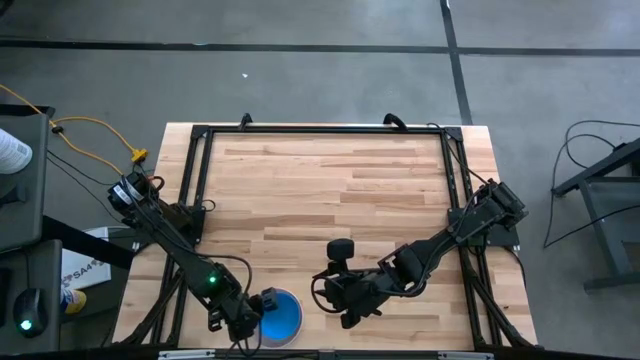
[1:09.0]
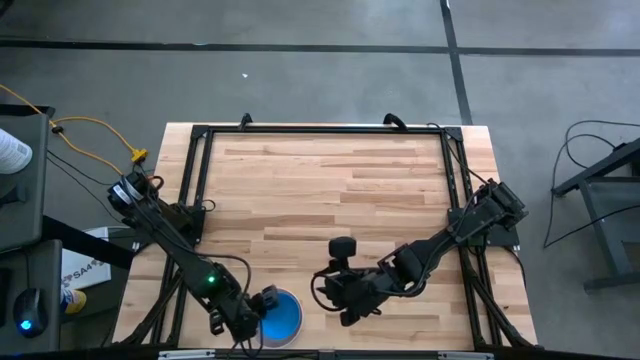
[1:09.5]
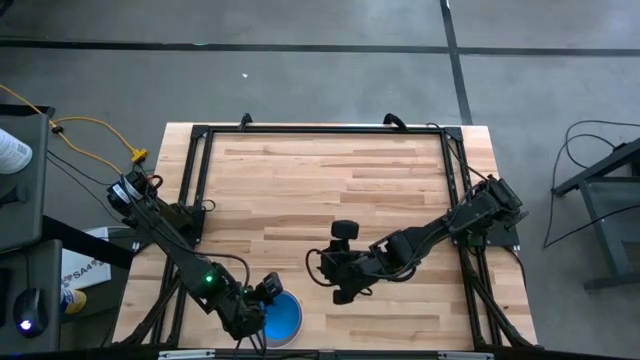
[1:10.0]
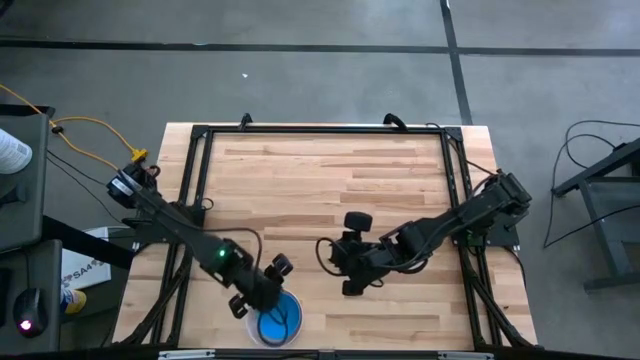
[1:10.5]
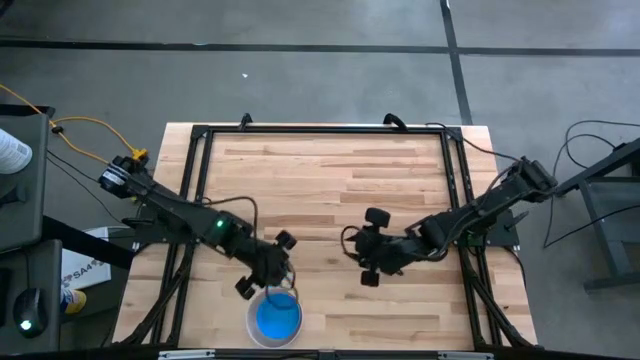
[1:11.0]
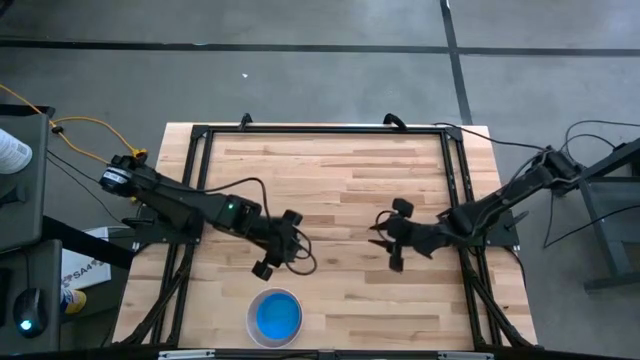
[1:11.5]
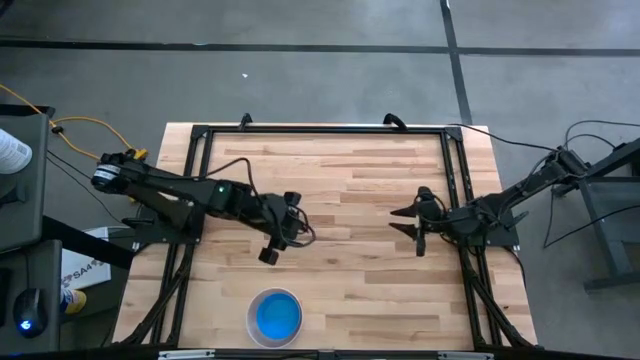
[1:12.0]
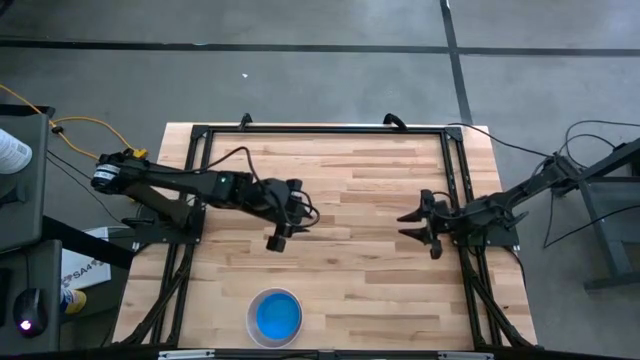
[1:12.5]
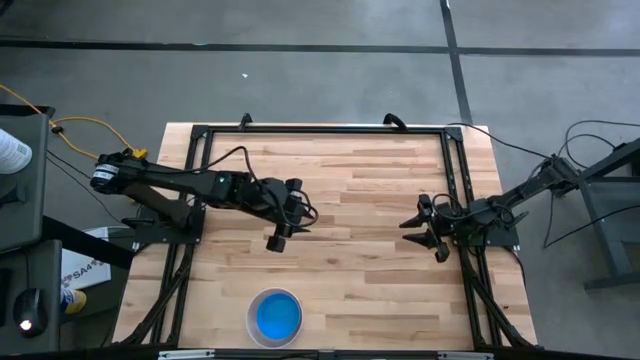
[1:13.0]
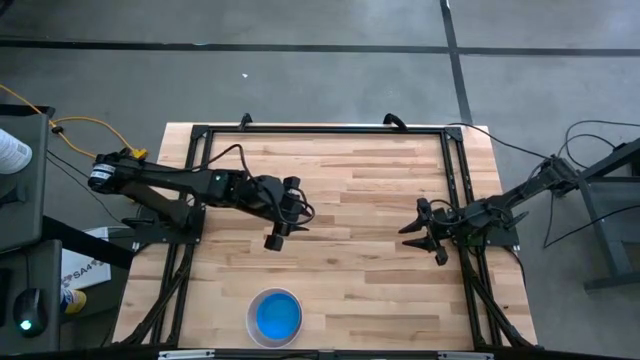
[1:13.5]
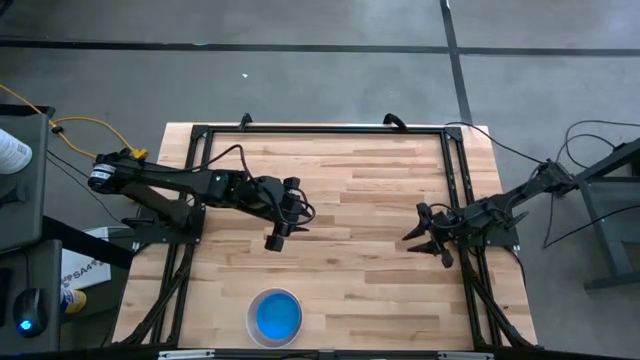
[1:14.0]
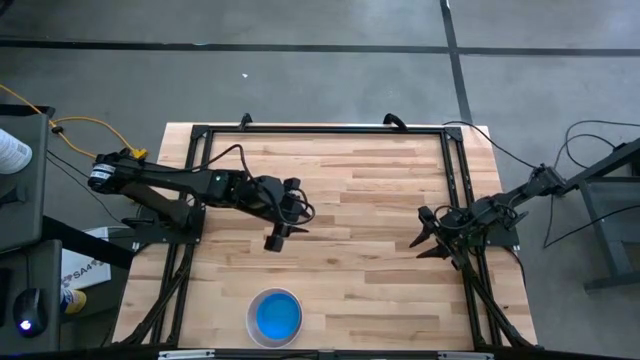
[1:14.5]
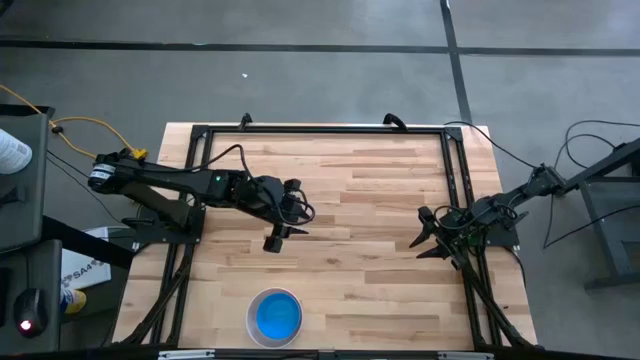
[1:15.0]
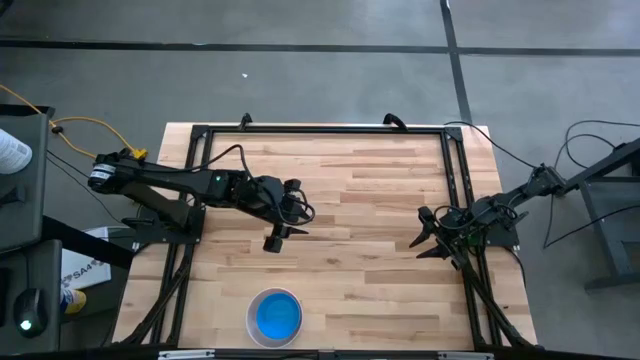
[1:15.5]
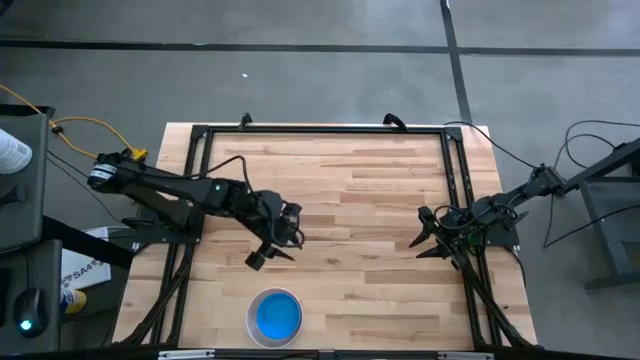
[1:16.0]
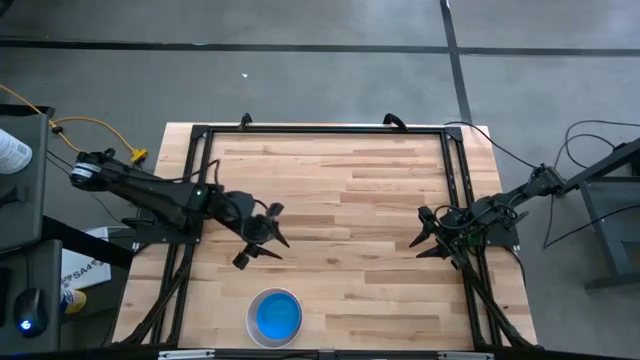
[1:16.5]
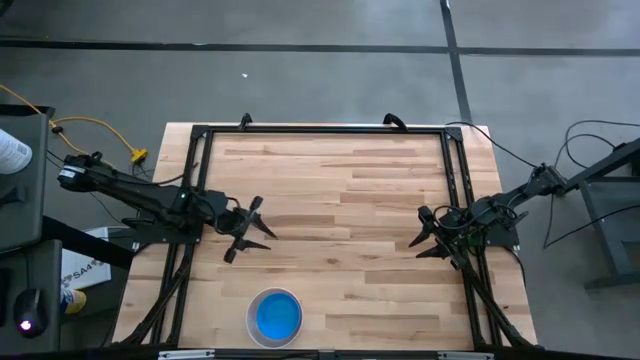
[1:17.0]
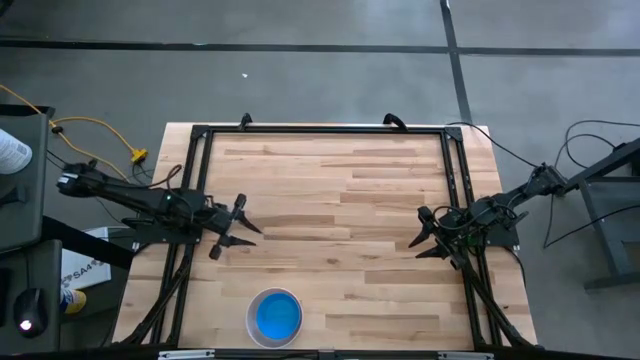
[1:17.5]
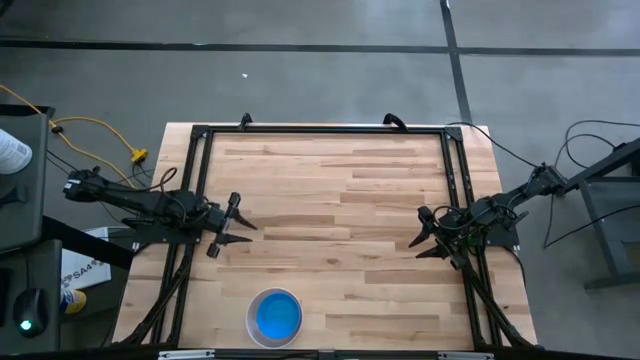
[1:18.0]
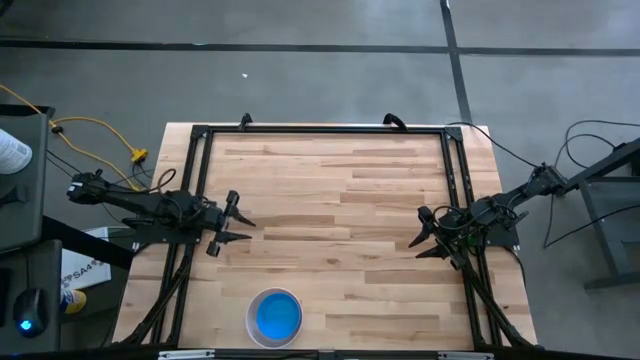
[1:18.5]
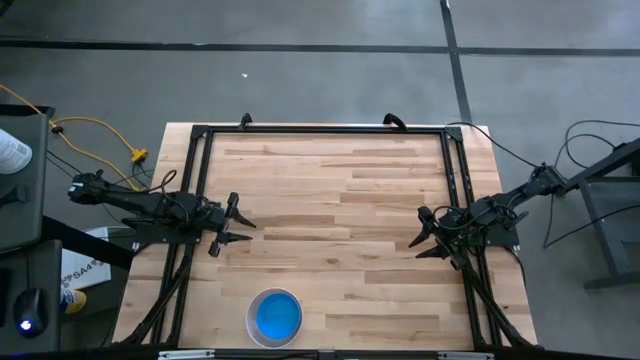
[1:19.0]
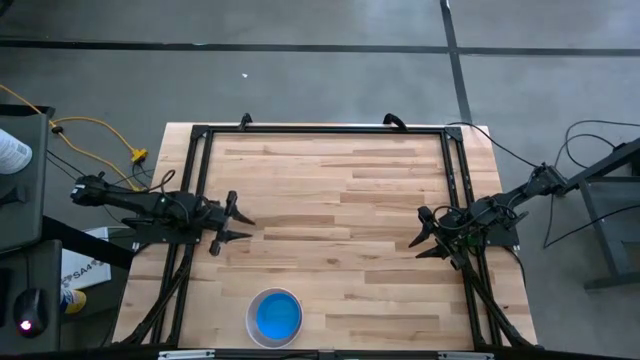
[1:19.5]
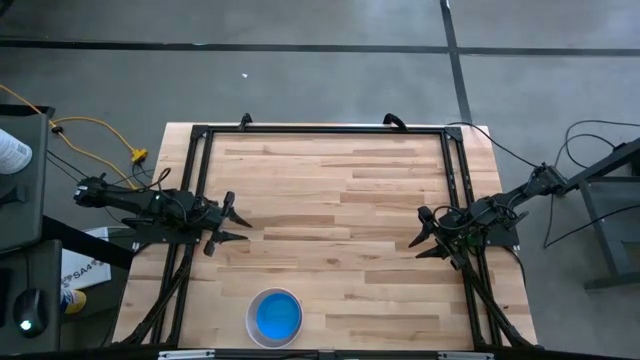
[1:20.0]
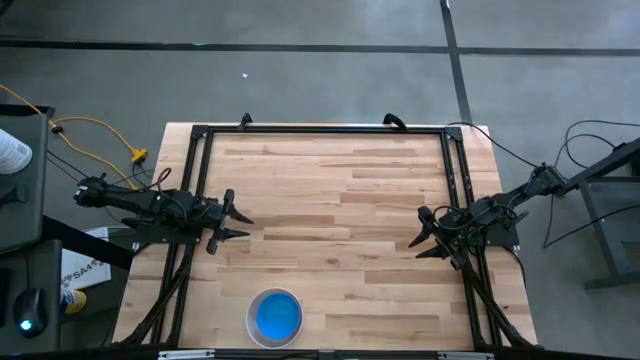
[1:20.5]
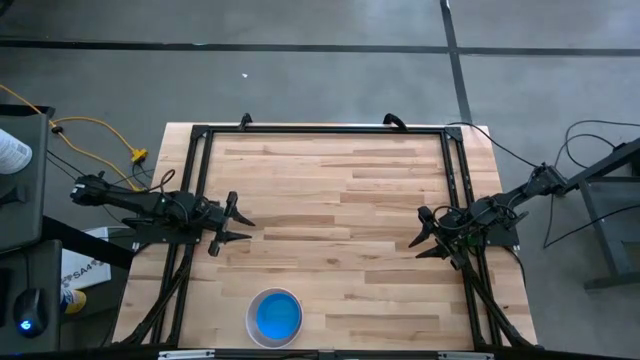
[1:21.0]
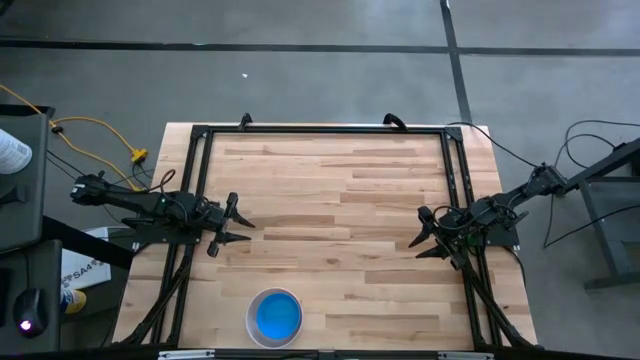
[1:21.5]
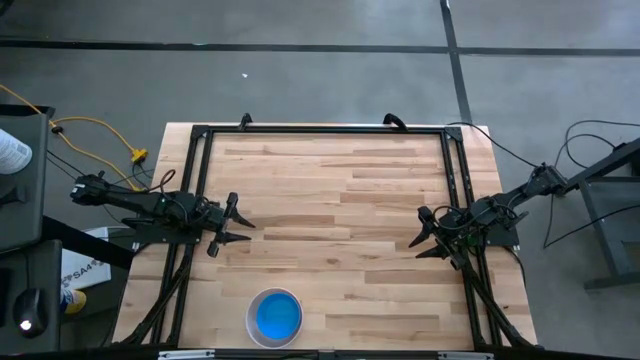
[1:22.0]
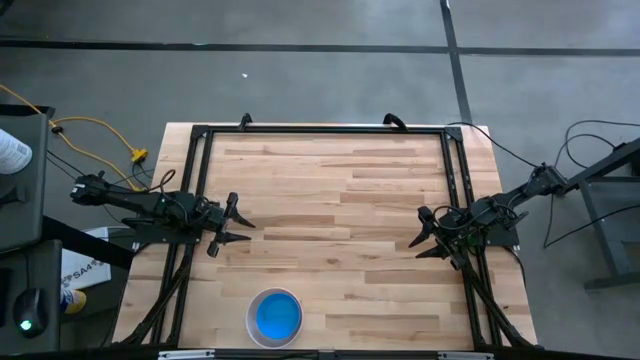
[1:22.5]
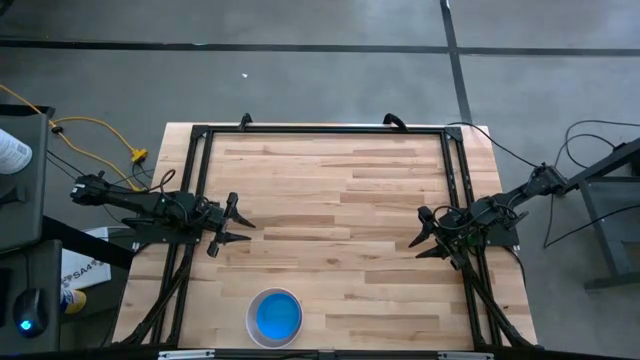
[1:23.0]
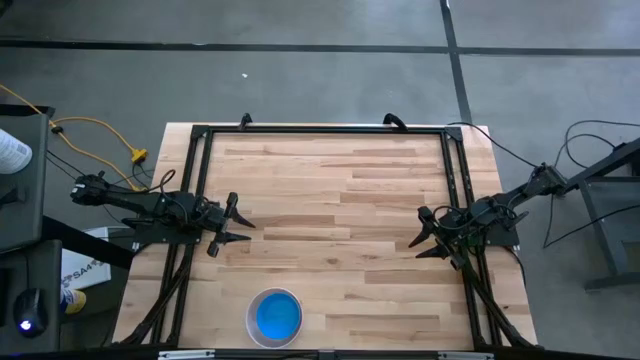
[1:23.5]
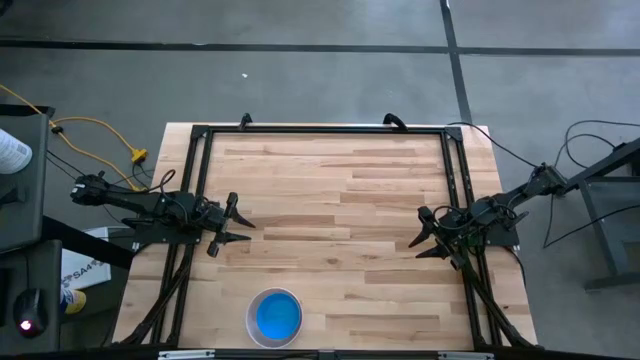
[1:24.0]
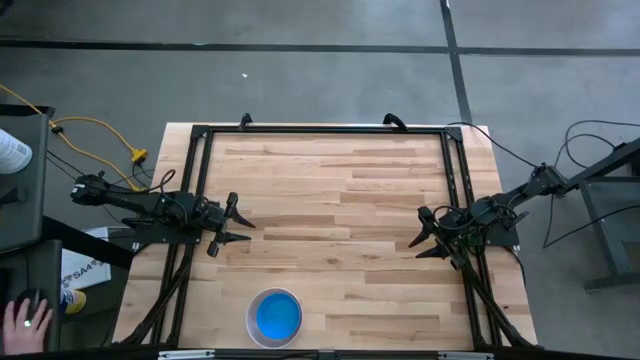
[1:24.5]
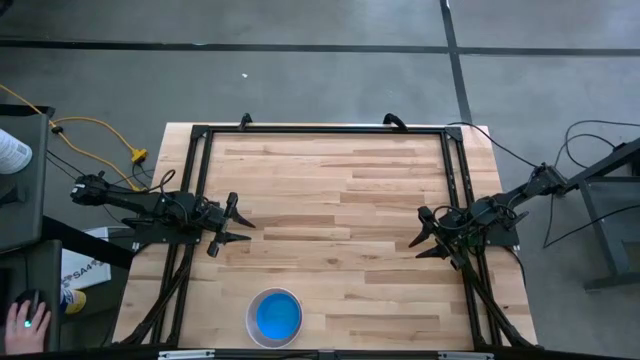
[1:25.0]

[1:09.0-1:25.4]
Return to Home Position

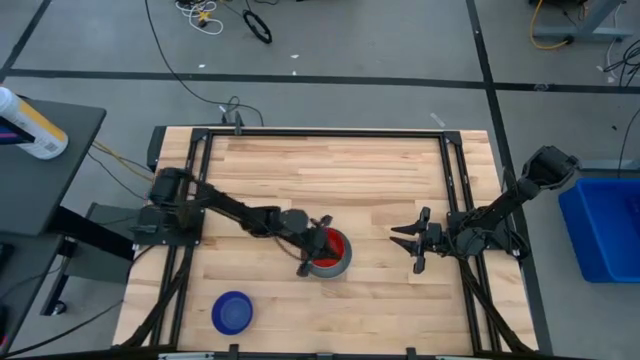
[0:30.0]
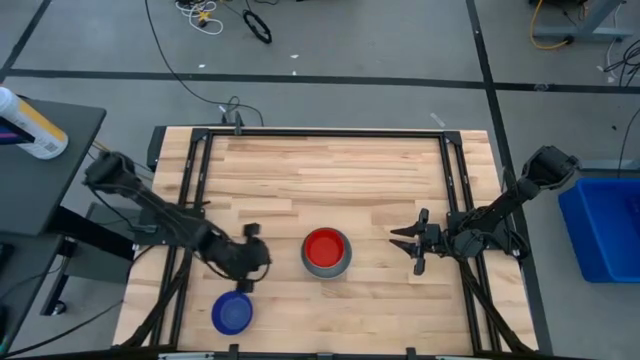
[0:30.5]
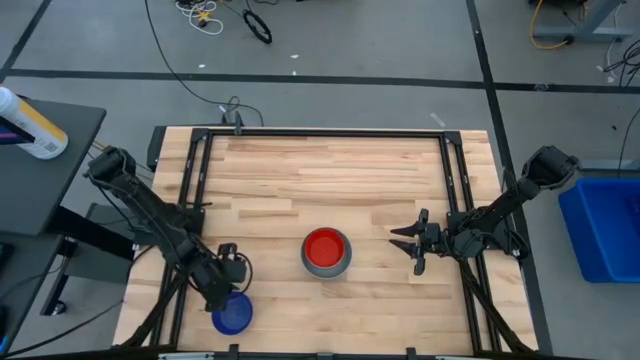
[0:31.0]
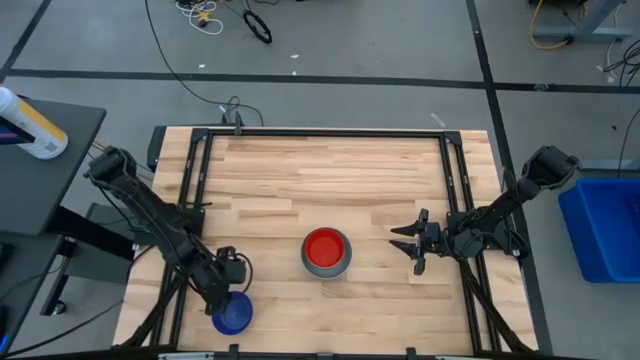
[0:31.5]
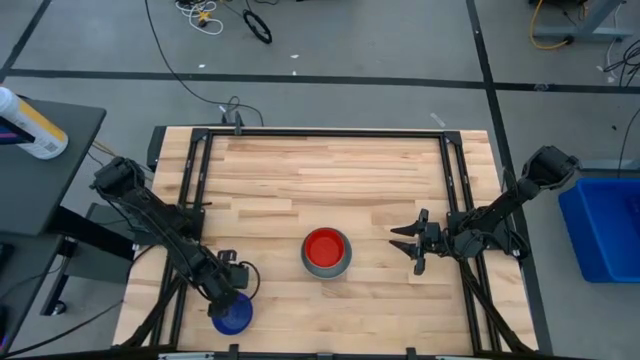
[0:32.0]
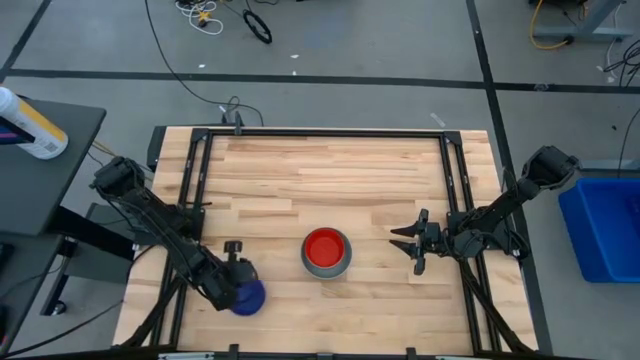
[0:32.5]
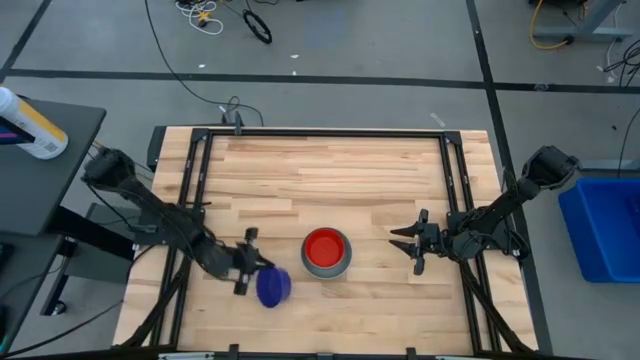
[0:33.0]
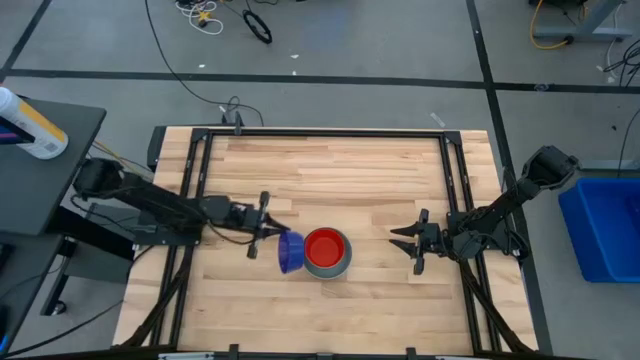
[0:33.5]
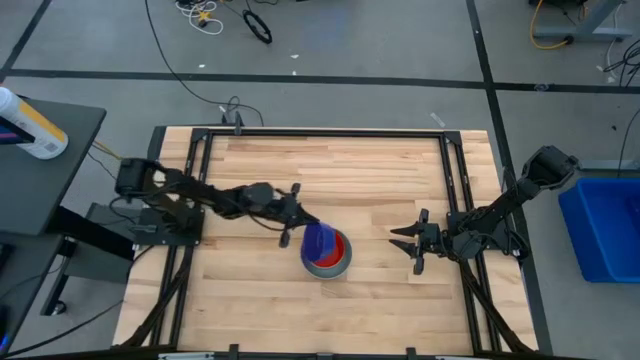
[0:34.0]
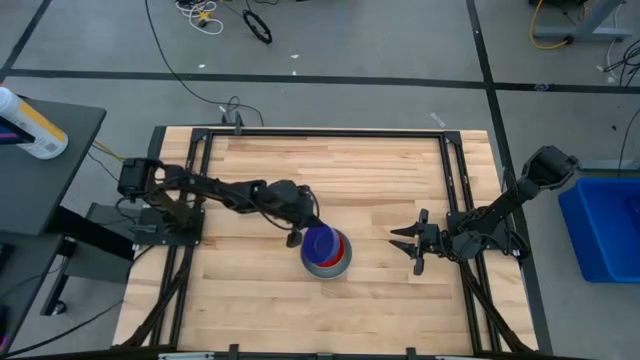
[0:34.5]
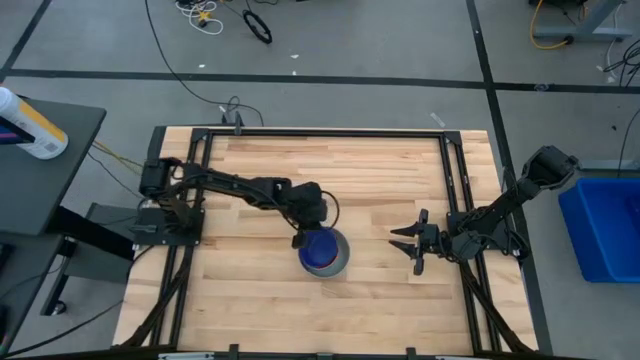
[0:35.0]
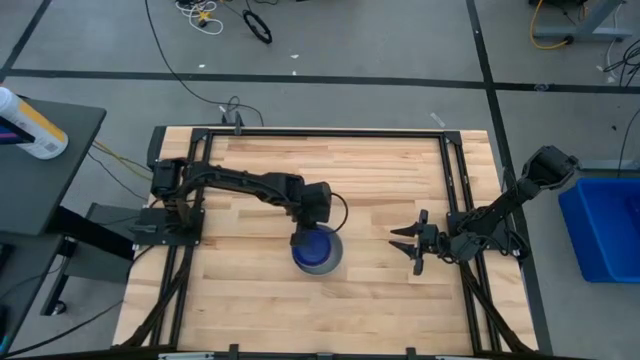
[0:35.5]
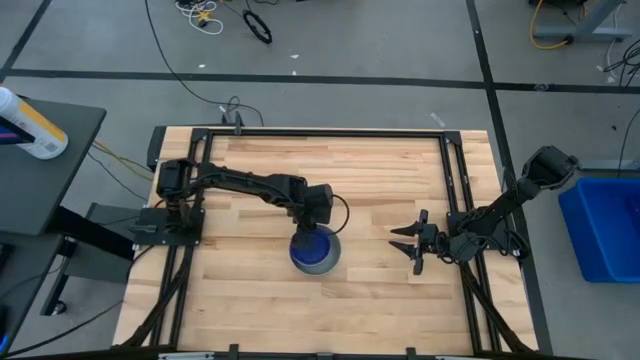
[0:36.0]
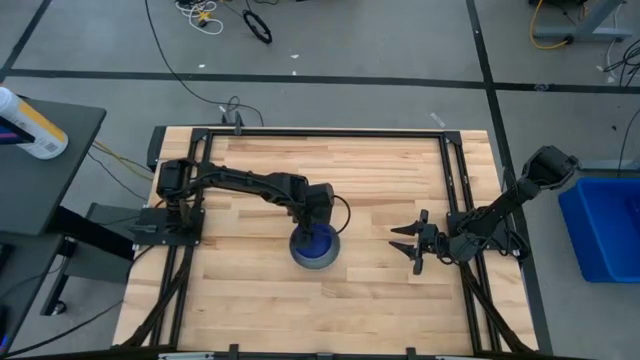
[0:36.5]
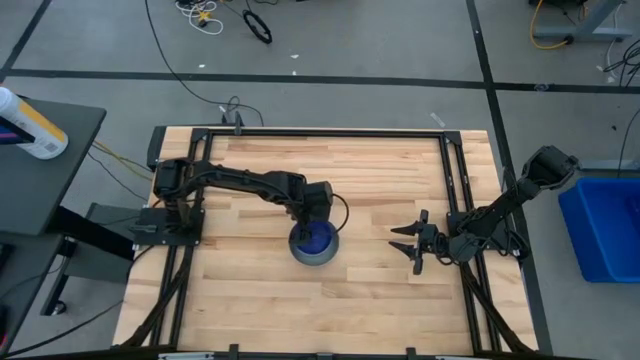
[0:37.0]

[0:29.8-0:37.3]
Stack the dark blue bowl on top of the red bowl
